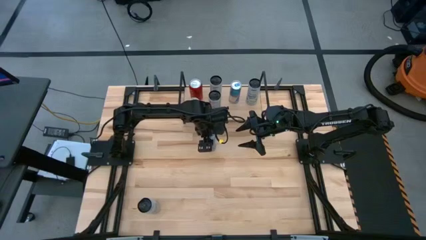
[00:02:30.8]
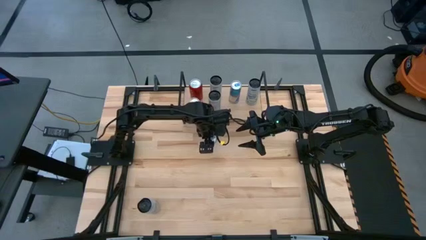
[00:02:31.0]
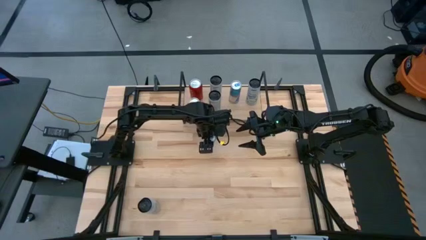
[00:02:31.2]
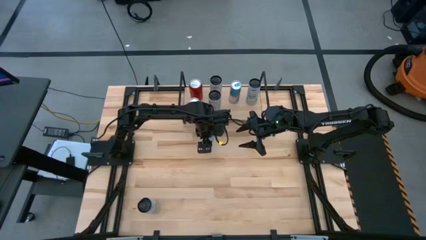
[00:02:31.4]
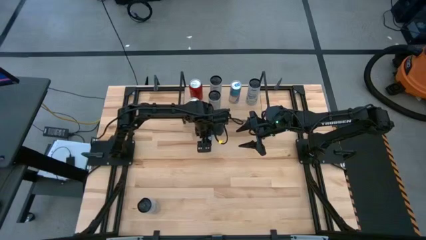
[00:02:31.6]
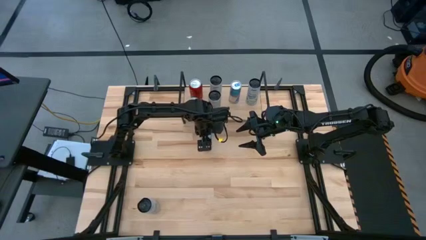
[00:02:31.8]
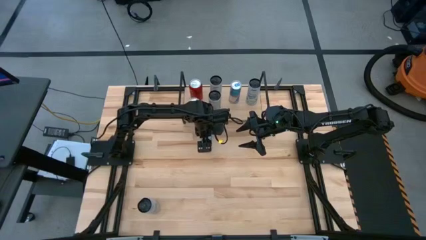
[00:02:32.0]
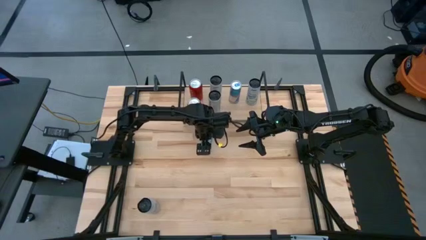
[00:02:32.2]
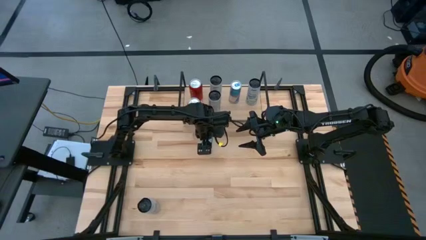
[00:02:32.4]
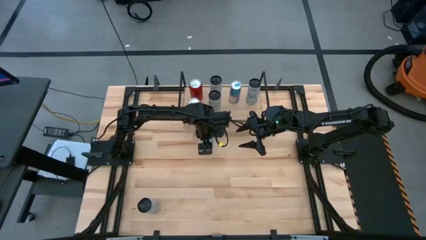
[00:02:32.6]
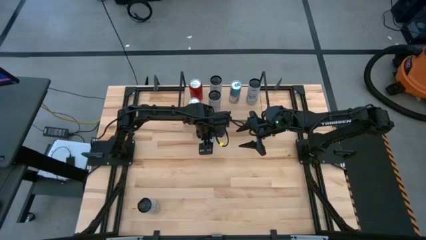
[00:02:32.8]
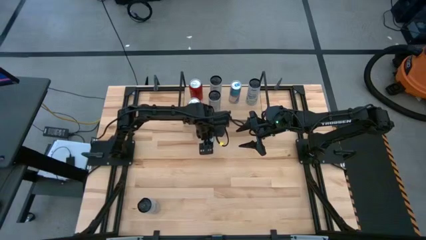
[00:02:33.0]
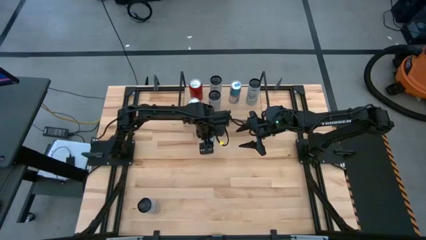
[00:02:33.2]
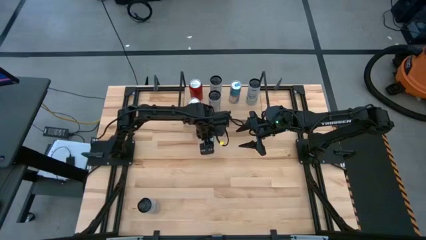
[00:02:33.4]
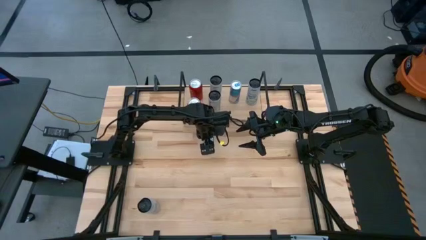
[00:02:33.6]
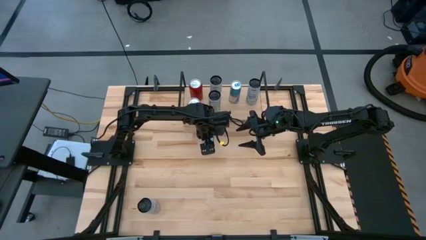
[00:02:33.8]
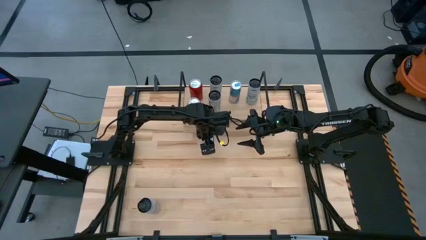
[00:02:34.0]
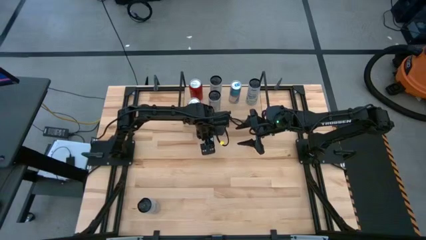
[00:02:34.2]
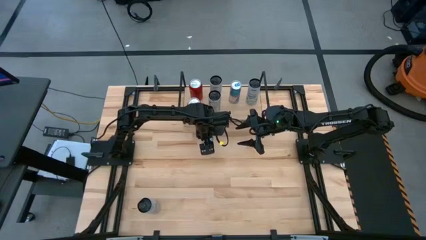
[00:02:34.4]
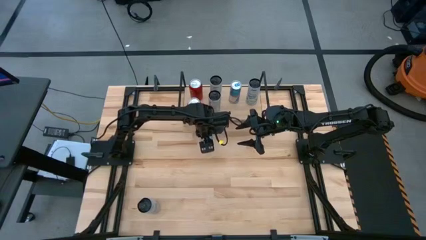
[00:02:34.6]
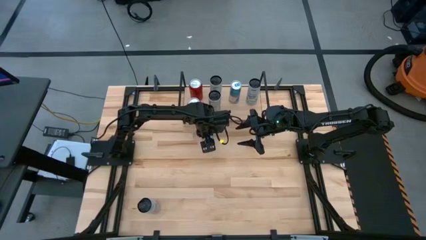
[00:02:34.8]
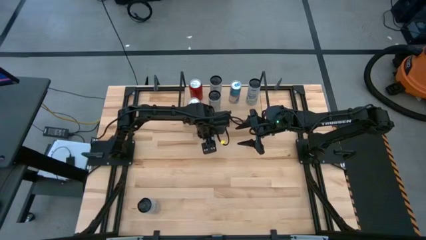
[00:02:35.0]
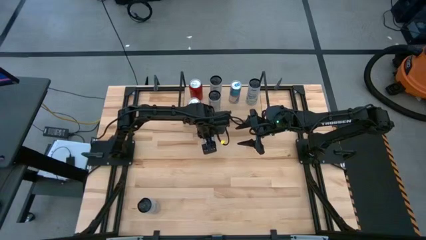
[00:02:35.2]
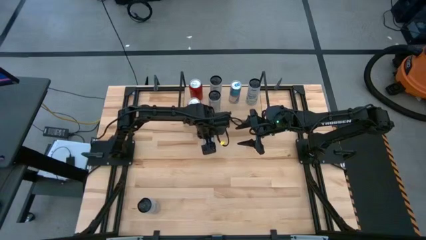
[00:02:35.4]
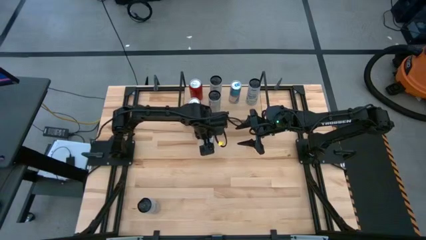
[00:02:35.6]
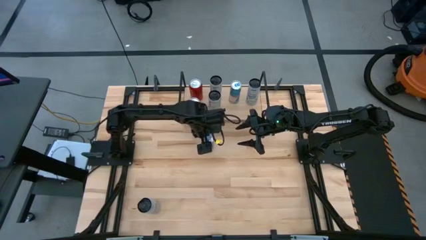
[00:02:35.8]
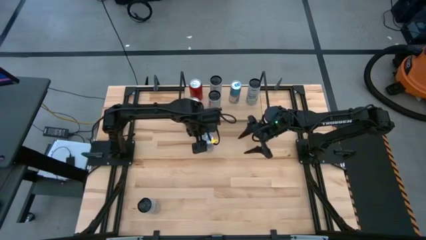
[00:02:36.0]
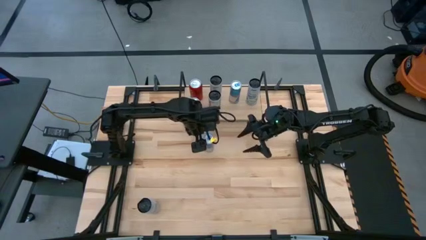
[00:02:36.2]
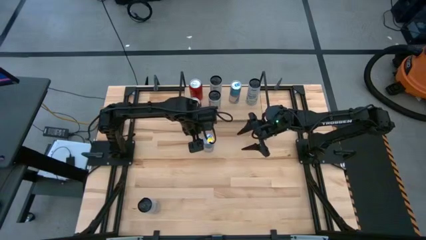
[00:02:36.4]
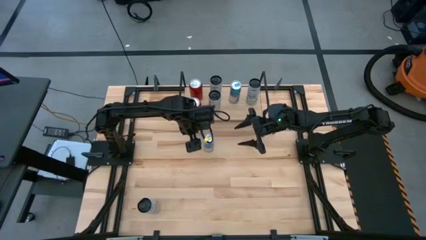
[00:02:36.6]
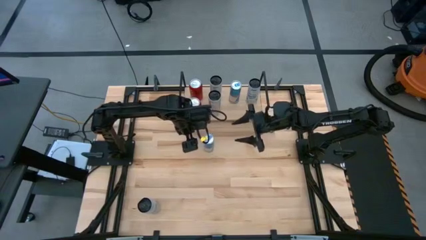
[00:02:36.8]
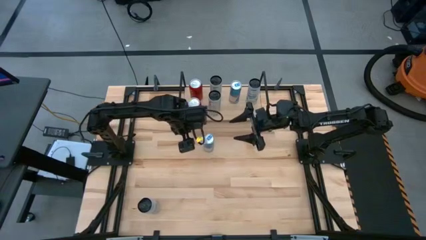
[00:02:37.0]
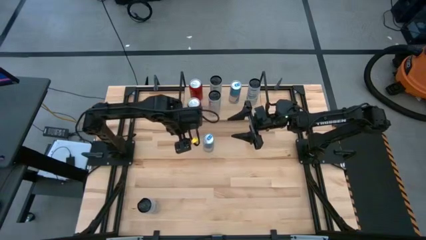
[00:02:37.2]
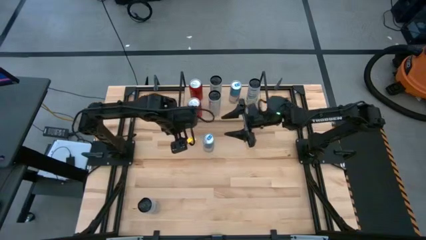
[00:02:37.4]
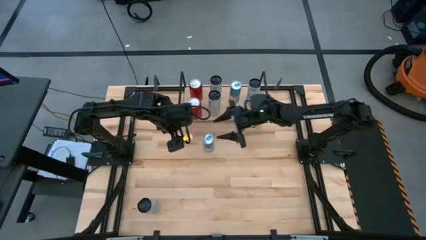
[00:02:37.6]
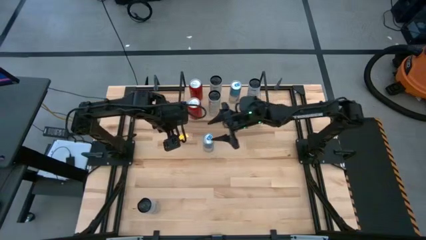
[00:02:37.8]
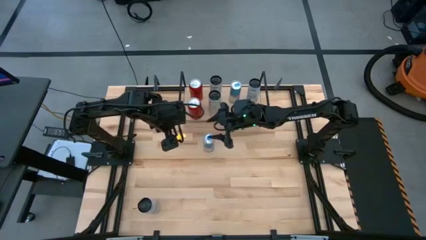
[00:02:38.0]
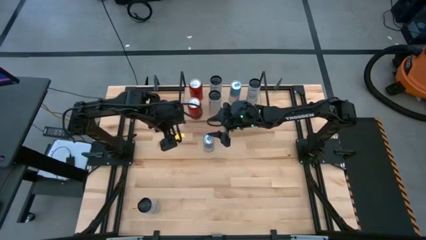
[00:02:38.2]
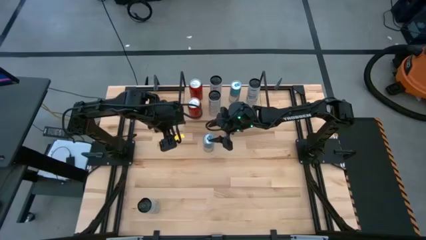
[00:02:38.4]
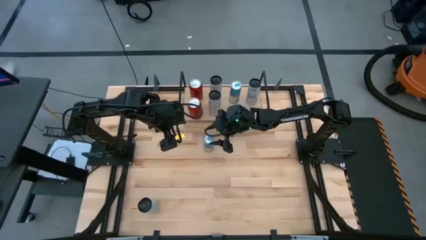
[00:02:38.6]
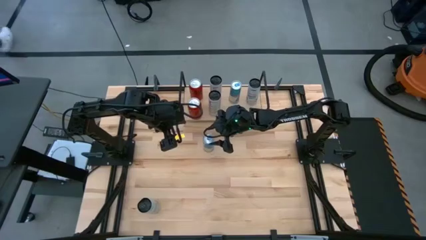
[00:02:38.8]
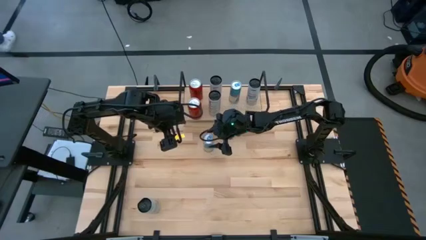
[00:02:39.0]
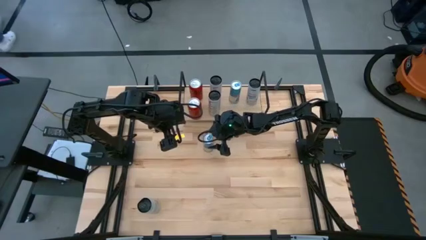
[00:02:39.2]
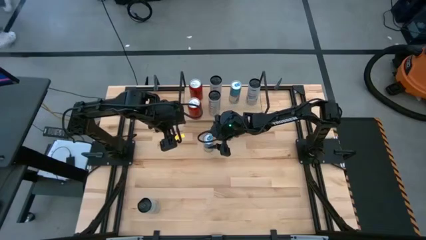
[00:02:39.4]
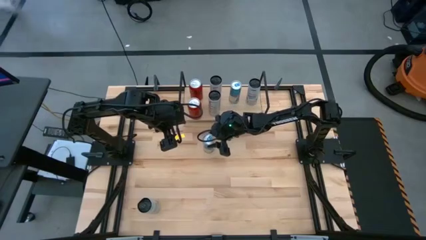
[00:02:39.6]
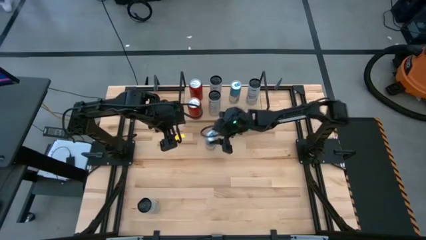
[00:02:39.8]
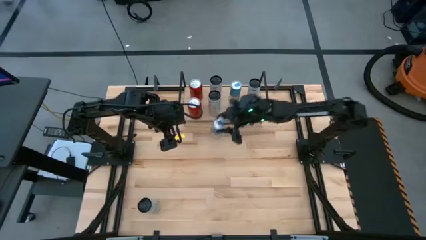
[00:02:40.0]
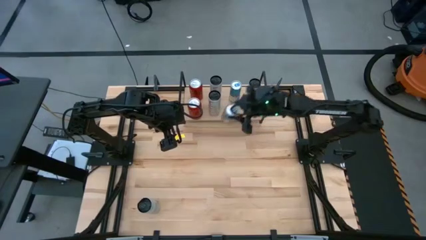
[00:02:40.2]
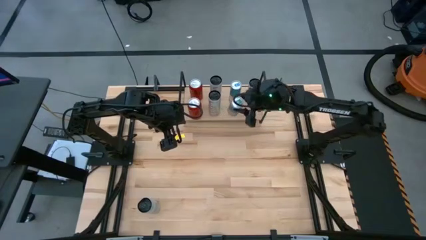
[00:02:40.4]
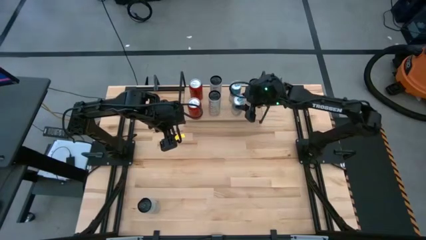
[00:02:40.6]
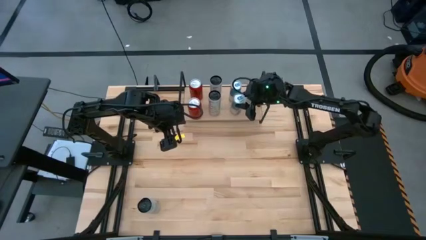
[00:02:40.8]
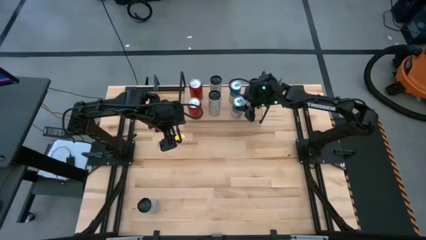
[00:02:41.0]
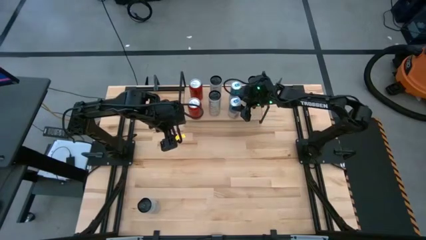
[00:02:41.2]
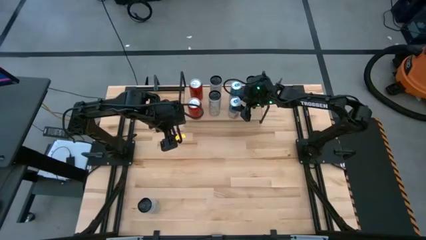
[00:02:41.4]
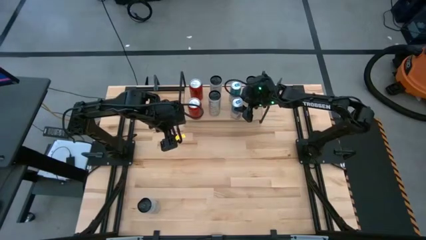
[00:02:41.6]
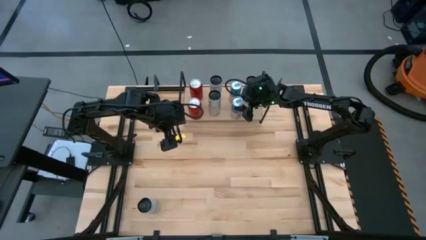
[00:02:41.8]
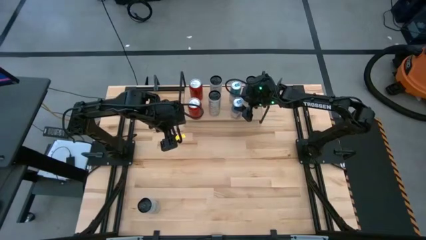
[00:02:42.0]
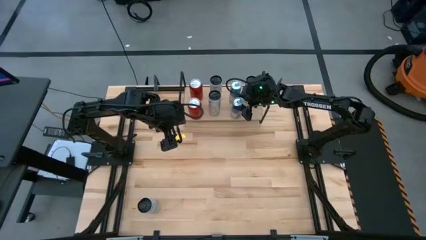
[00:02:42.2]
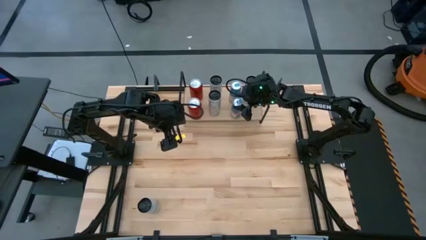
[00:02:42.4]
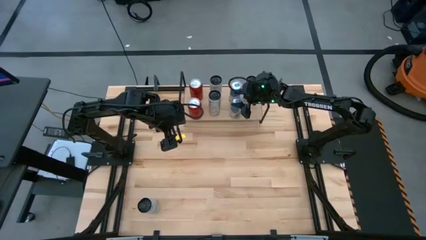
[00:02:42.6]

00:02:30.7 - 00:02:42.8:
Task: Place canned beverage on shelf
Put the blue soda can aligned with the other blue soda can on the shelf

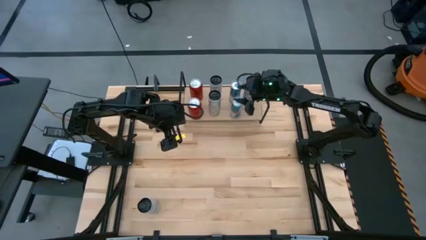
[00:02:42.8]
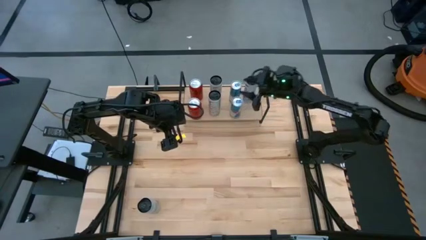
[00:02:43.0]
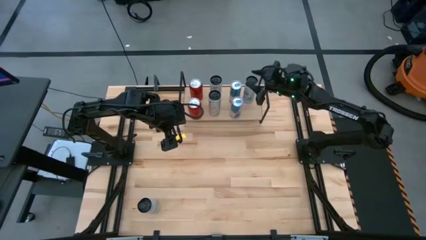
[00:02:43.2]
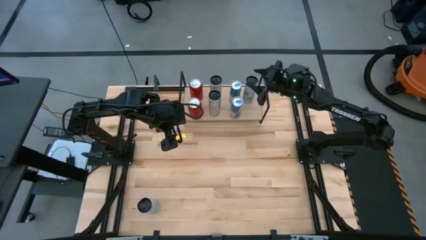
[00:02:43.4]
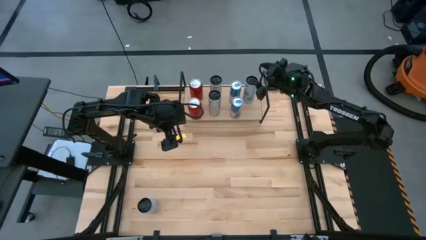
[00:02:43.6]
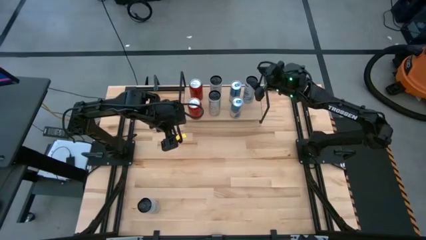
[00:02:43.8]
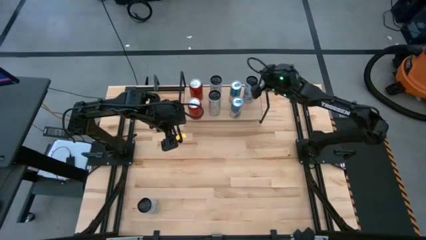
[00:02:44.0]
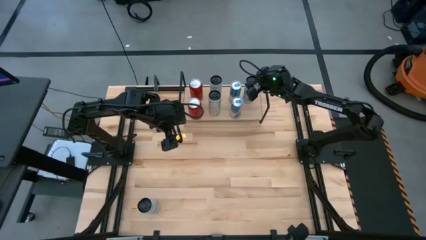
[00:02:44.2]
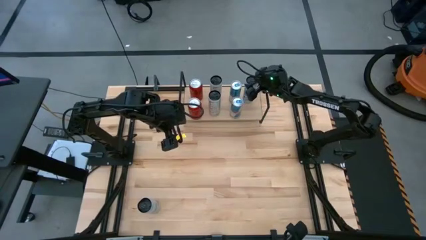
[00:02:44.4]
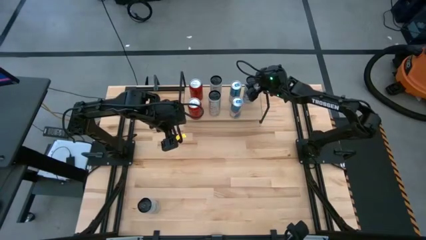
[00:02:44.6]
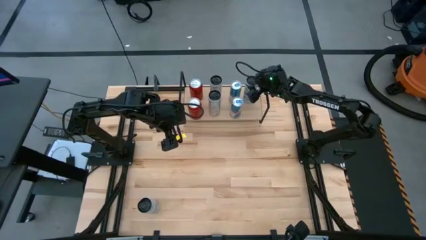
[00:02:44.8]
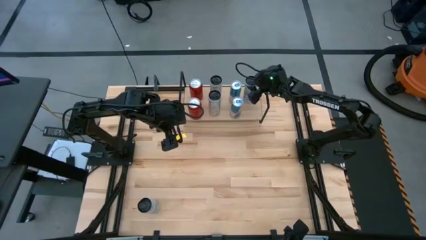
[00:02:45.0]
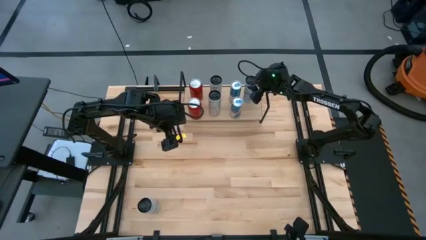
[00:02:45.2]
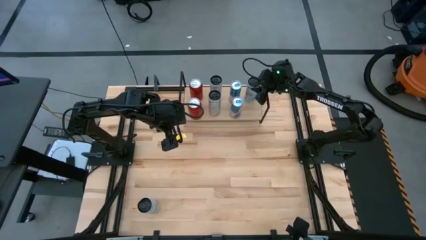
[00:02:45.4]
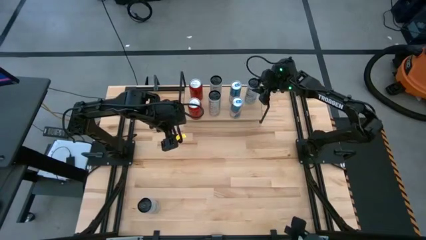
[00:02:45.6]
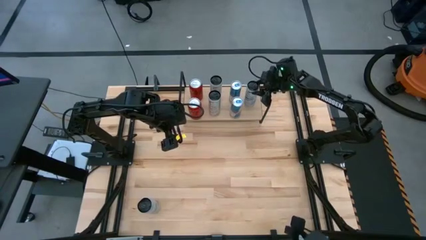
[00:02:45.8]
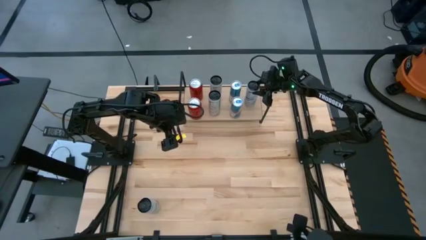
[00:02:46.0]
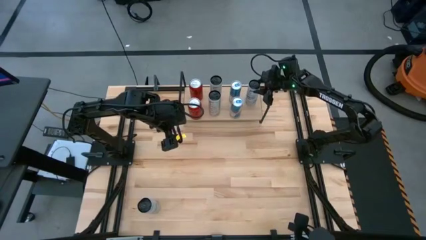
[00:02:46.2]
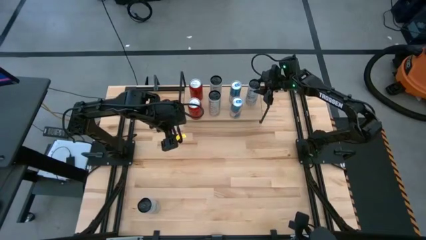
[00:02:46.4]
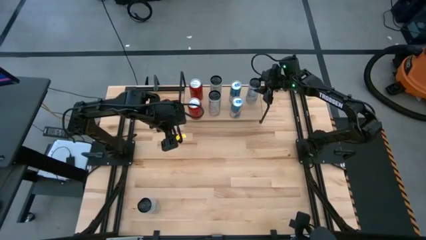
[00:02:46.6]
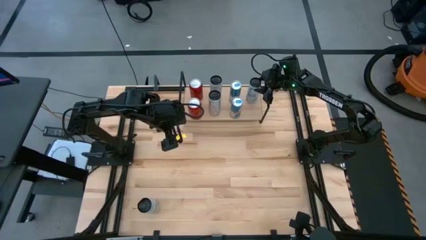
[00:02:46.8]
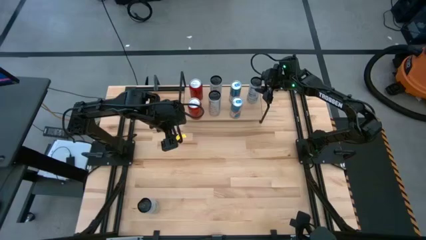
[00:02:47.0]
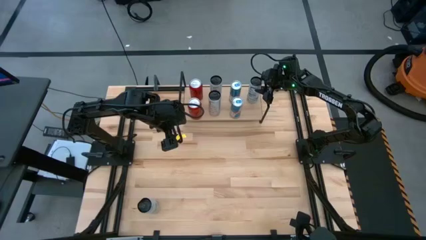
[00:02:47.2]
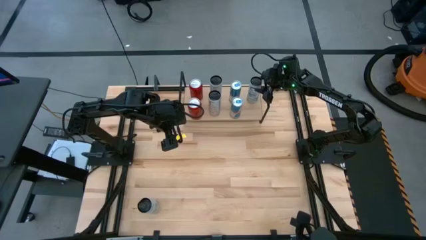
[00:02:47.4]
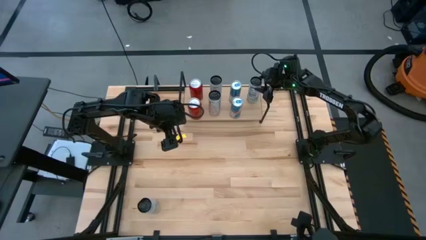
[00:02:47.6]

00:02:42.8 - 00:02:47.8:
Adjust the white blue soda can
